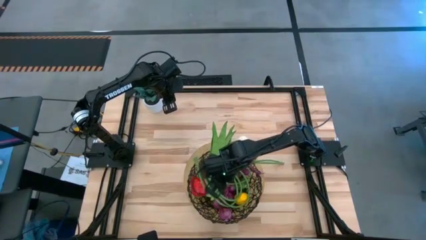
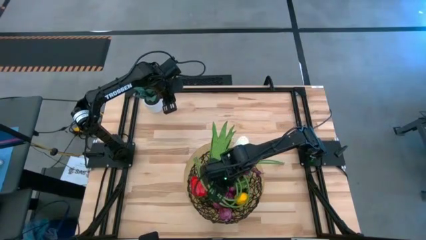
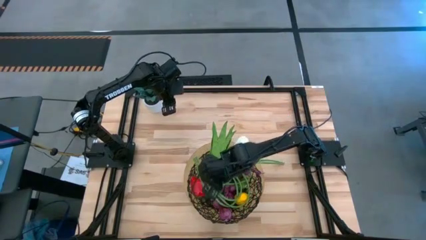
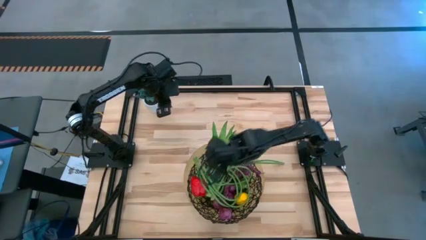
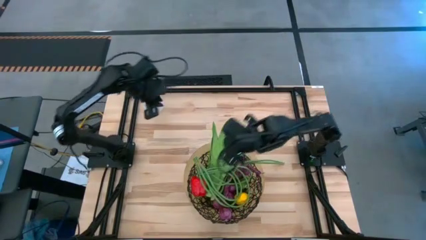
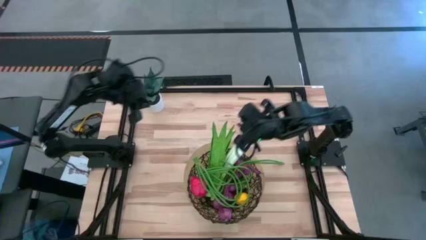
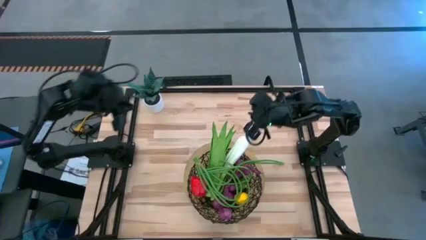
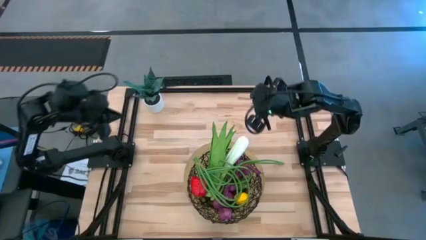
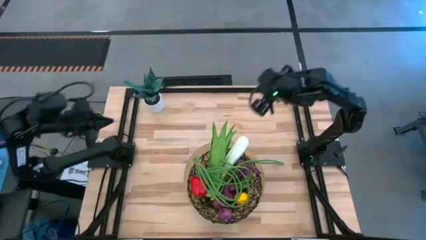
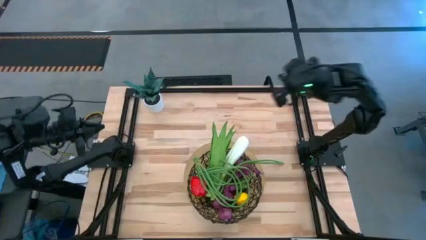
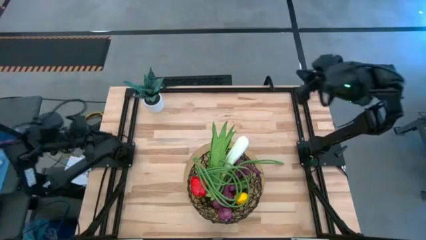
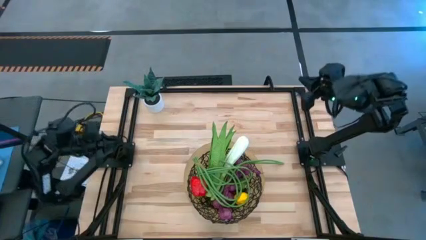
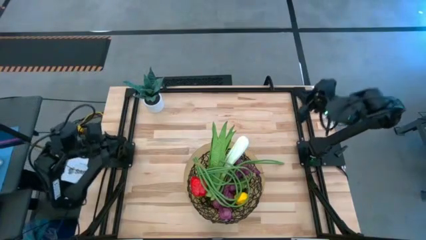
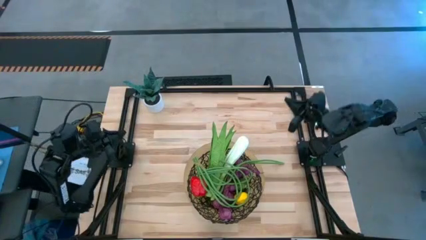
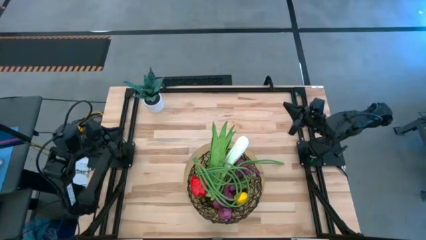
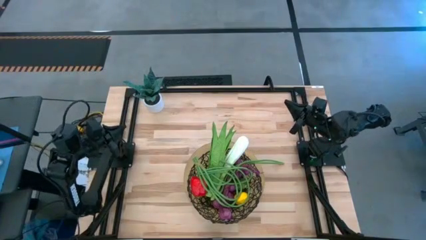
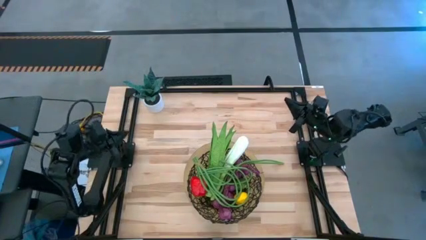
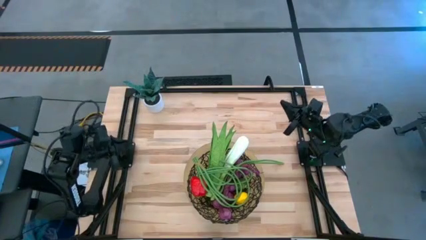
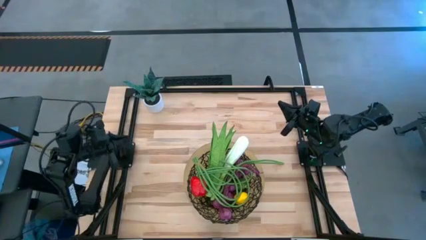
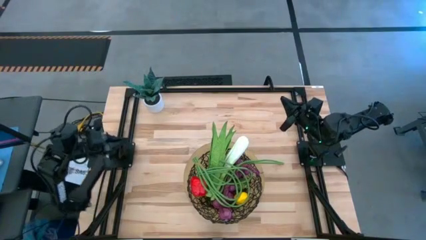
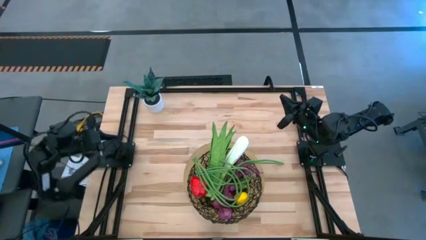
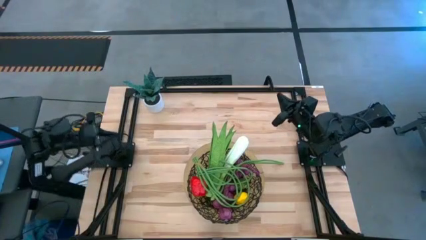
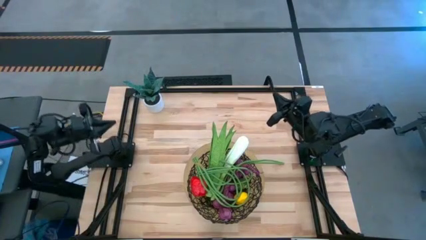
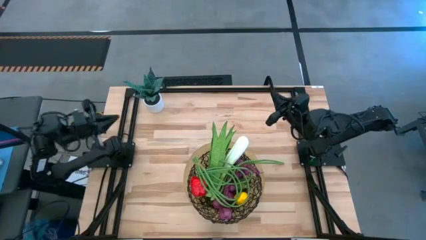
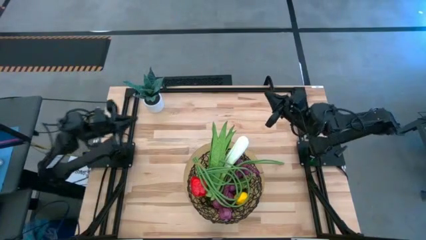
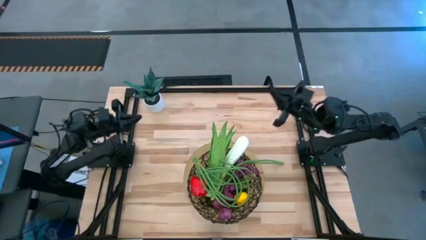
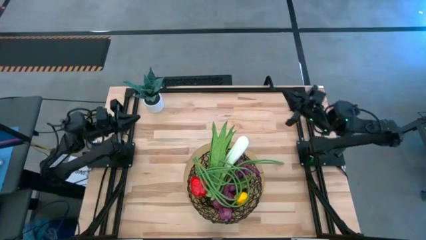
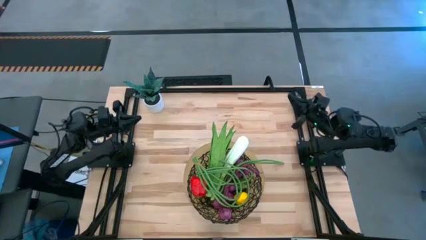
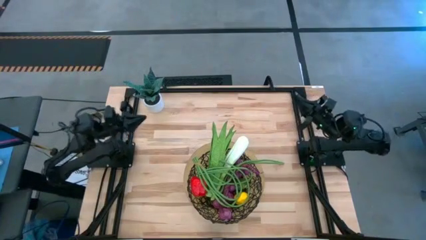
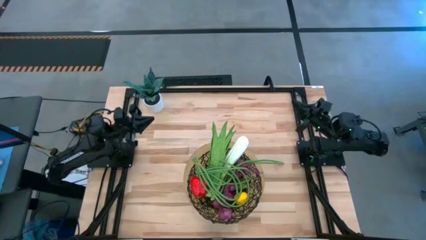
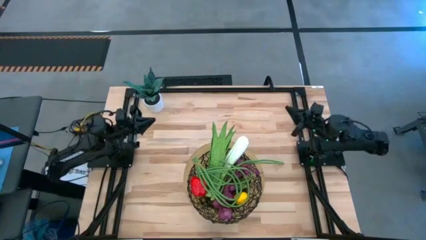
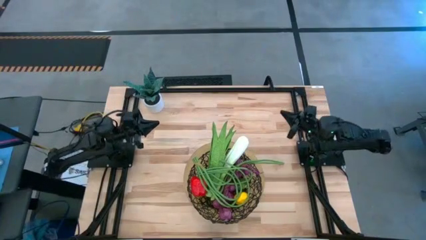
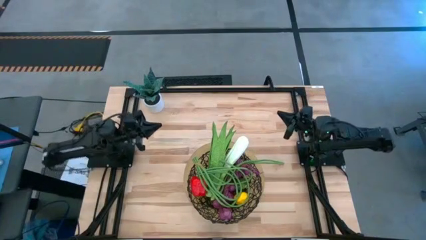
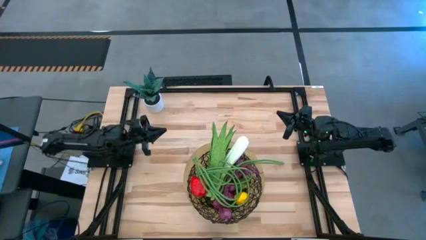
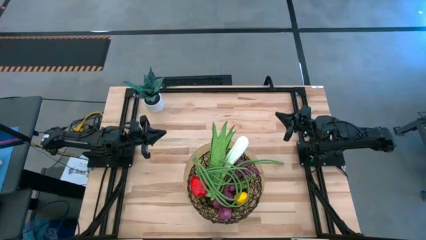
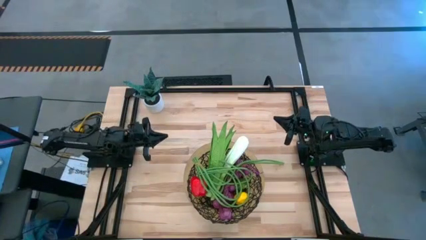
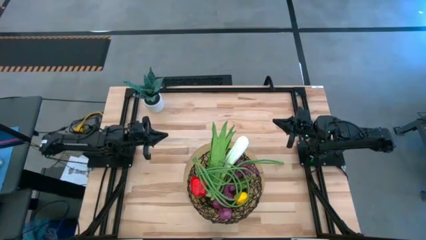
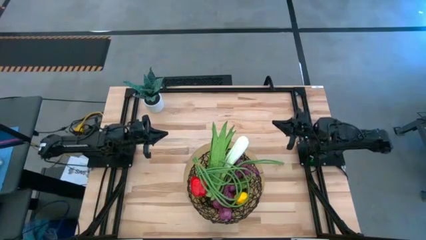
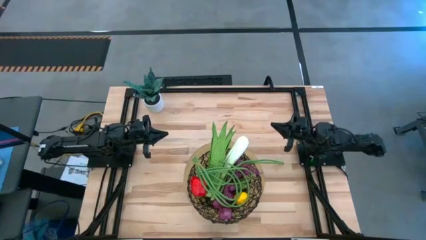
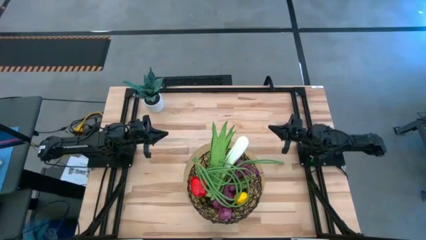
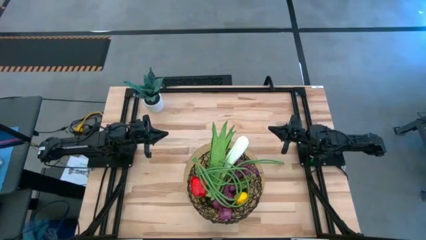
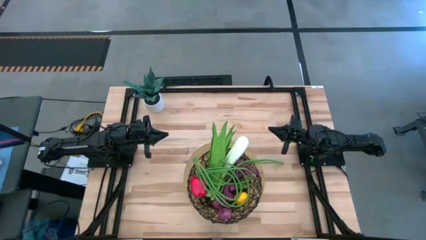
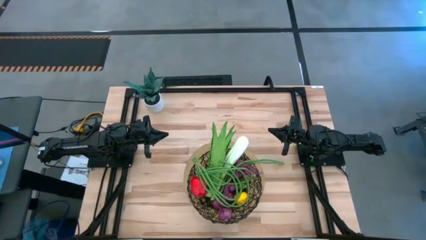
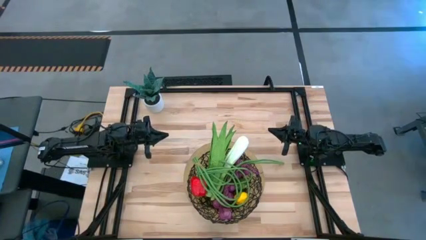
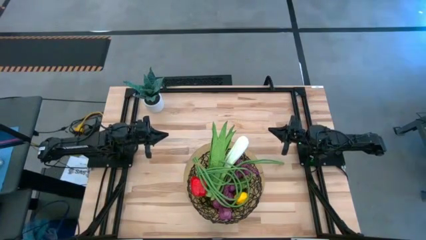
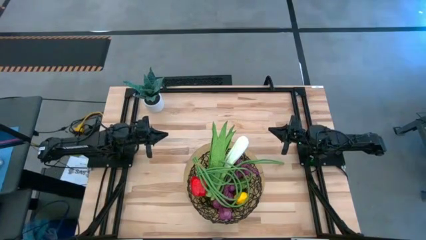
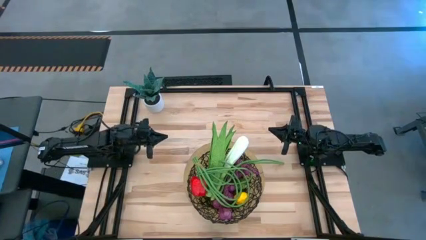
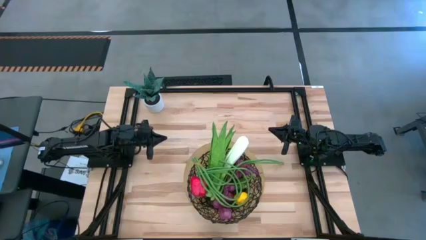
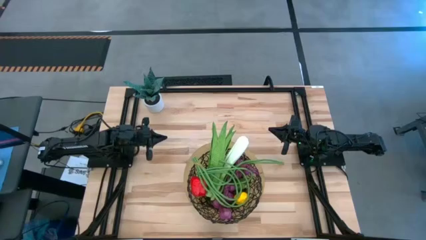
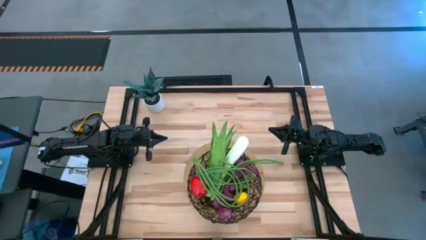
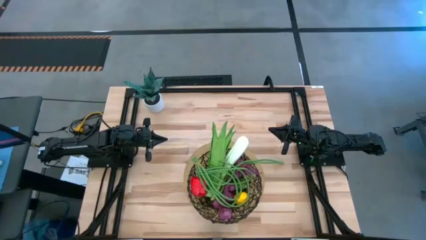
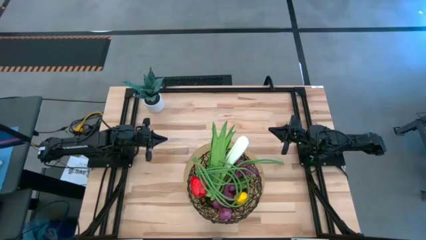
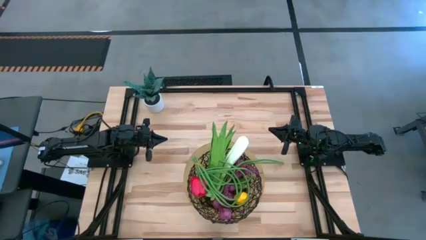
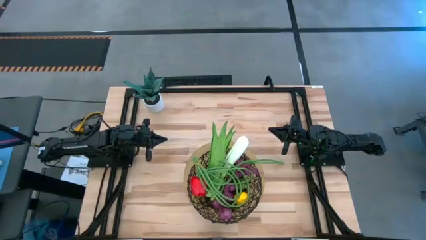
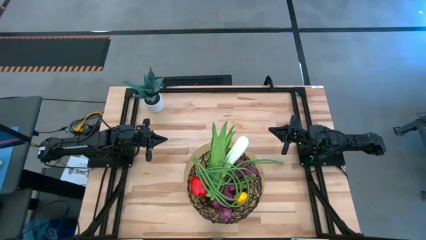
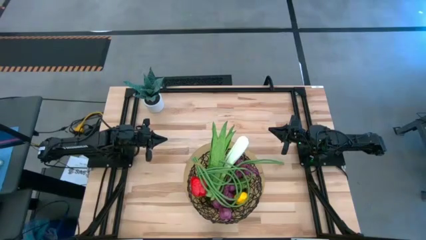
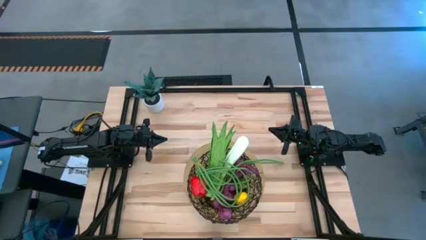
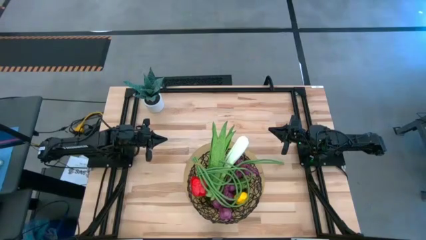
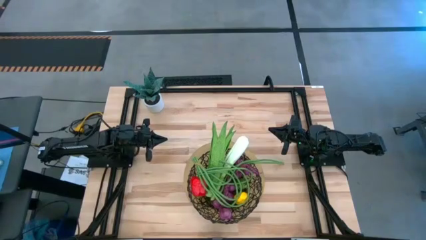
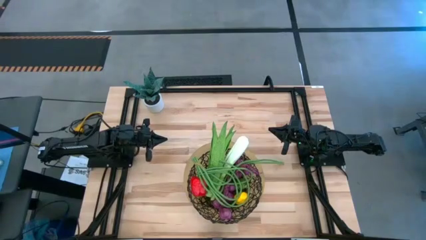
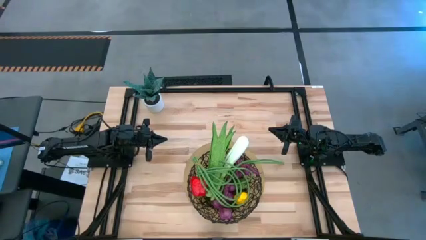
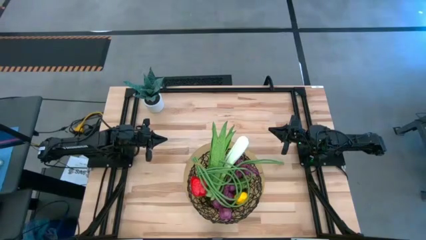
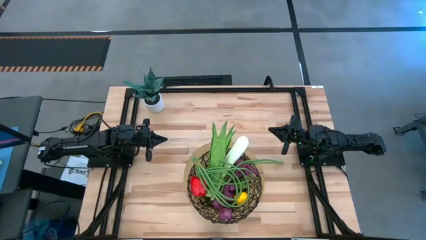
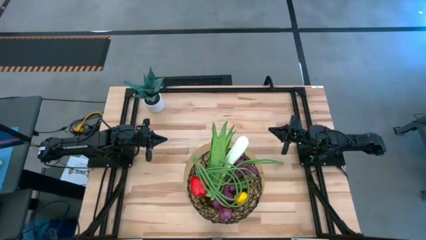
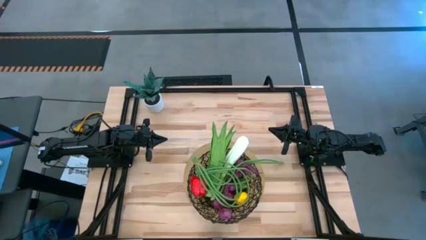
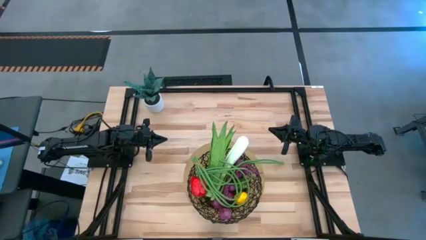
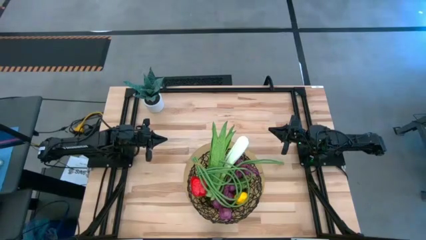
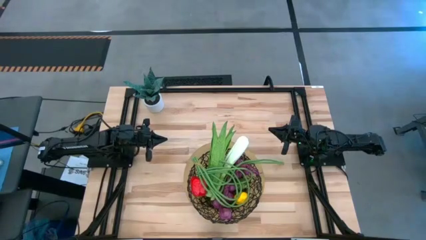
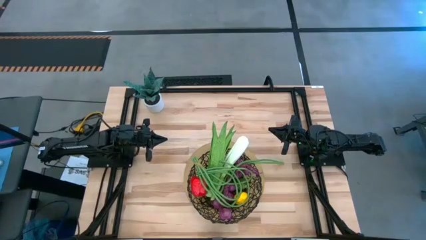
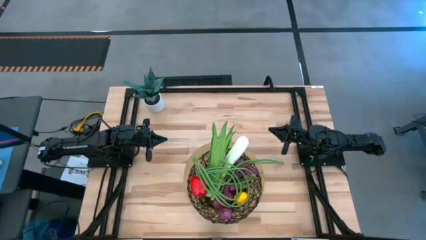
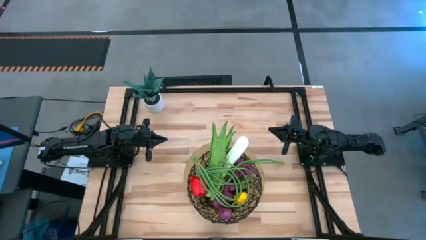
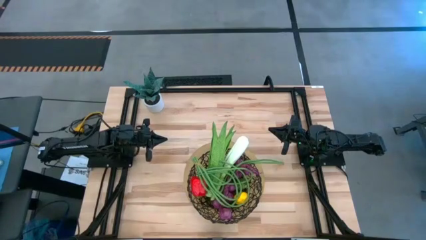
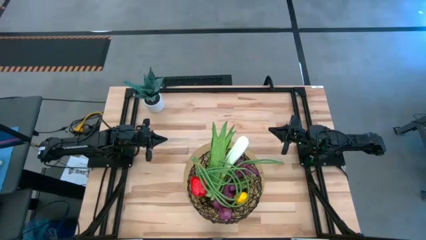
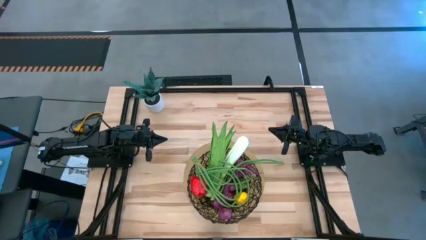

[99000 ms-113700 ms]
Task: Build produce basket
Return to Home Position
